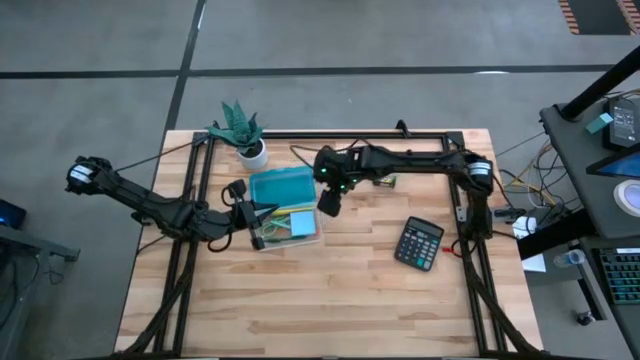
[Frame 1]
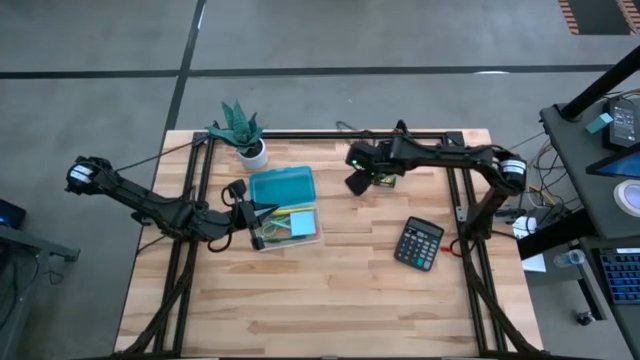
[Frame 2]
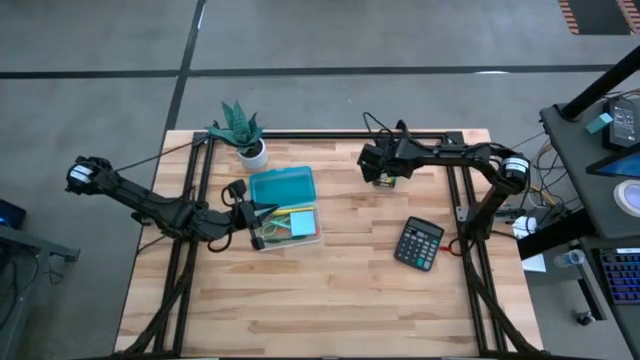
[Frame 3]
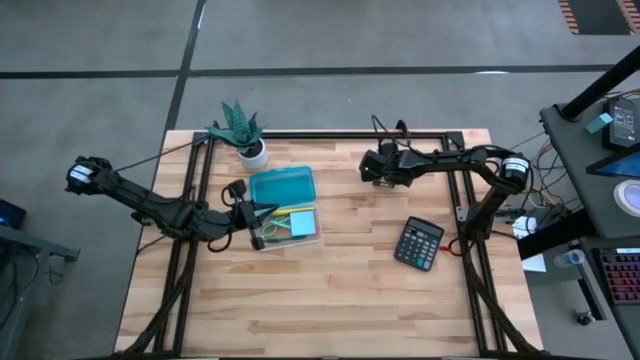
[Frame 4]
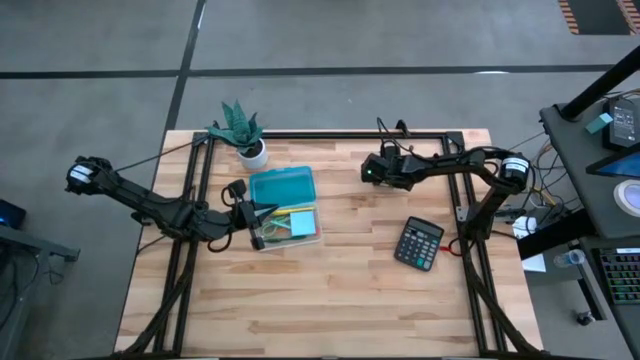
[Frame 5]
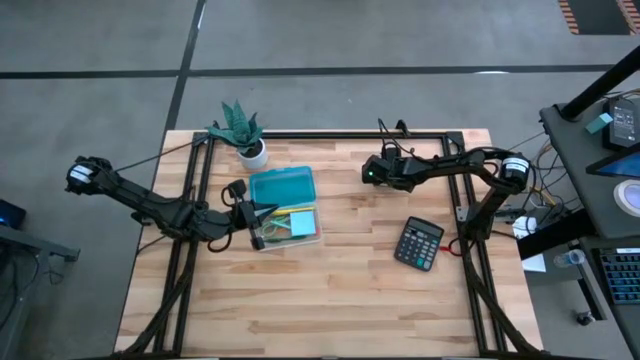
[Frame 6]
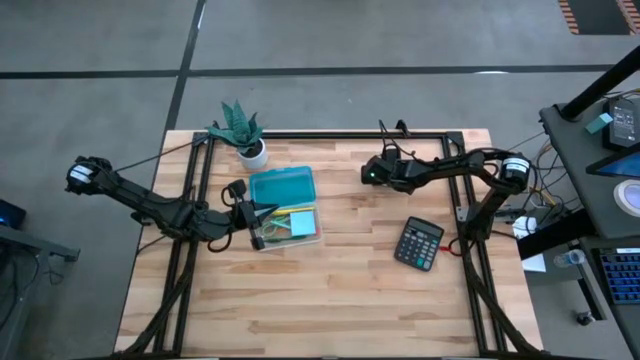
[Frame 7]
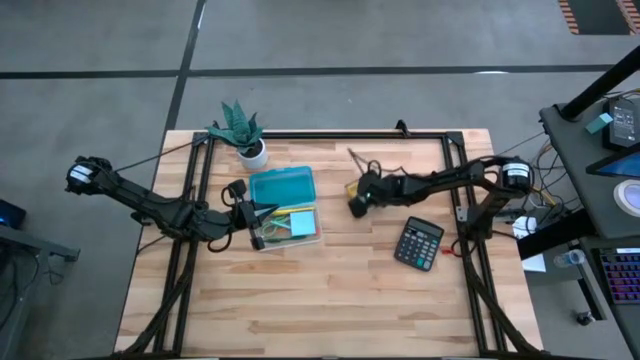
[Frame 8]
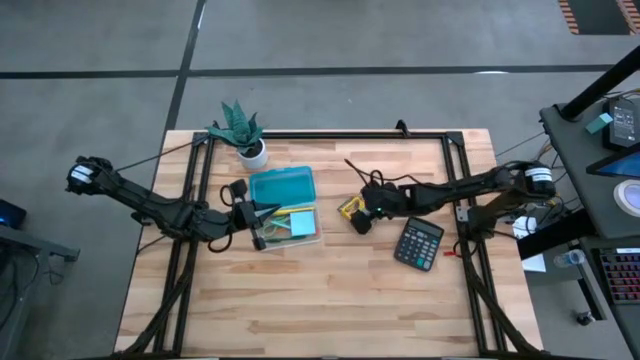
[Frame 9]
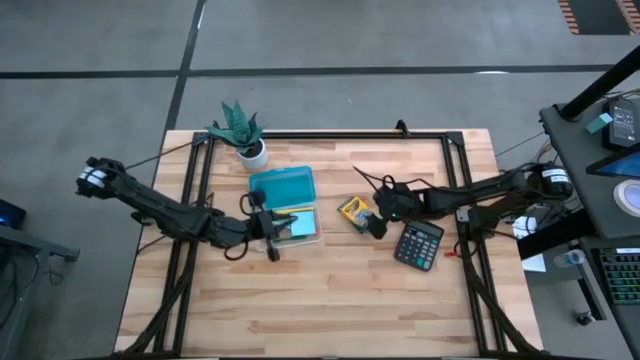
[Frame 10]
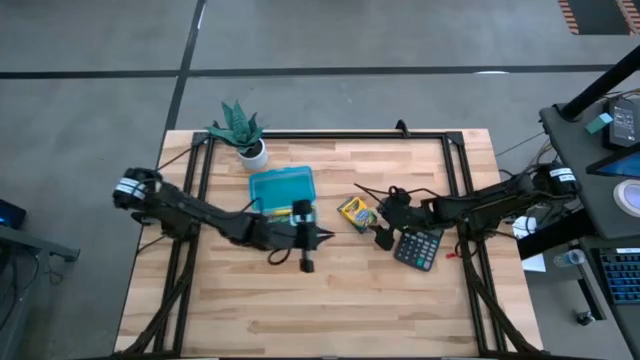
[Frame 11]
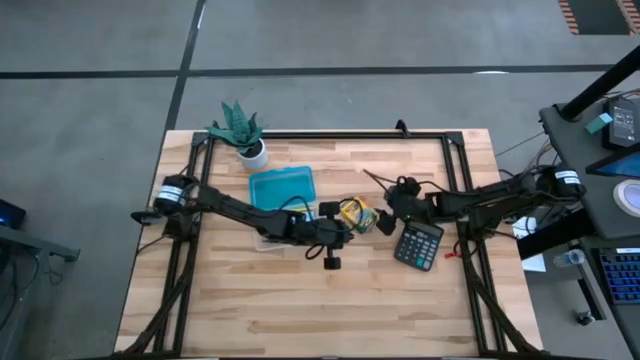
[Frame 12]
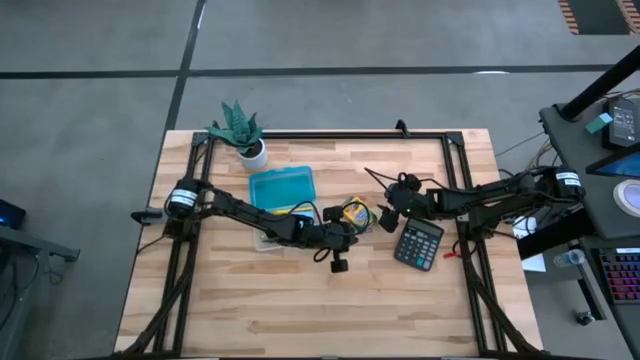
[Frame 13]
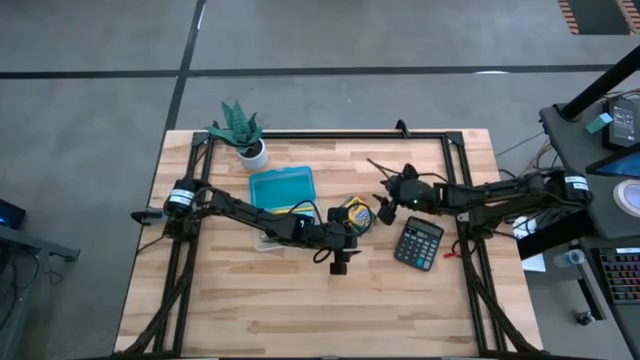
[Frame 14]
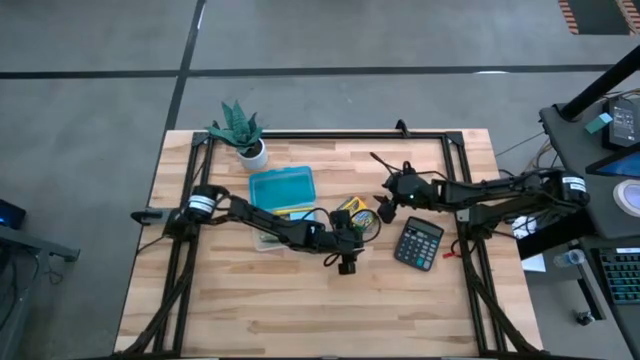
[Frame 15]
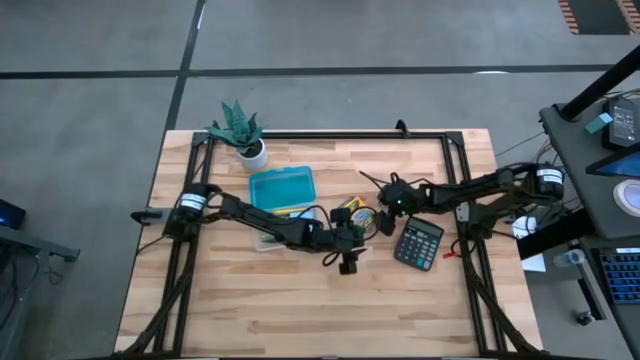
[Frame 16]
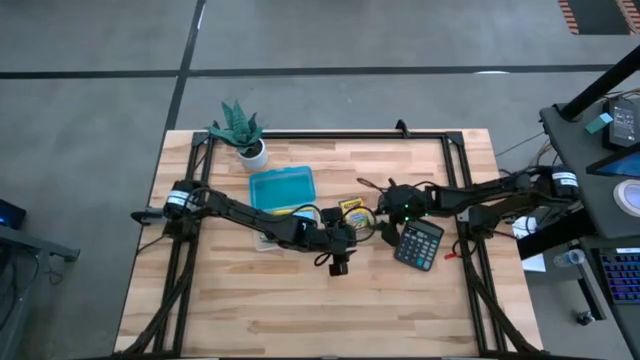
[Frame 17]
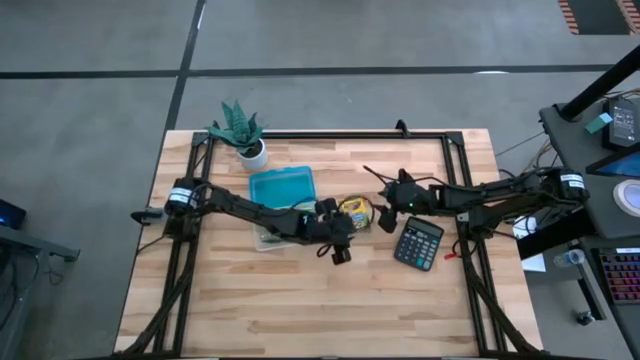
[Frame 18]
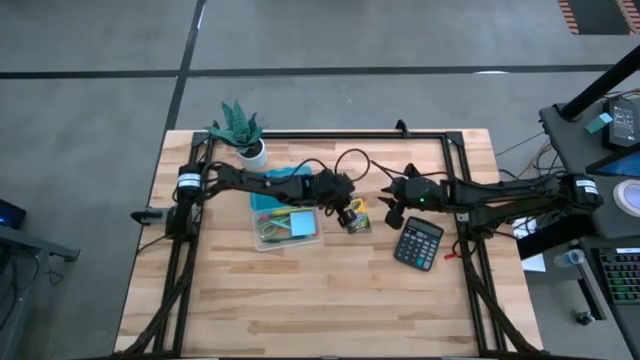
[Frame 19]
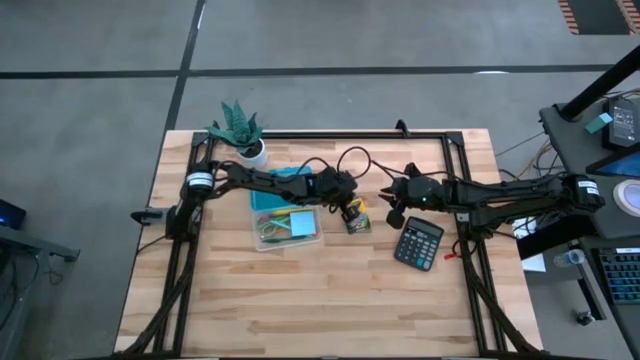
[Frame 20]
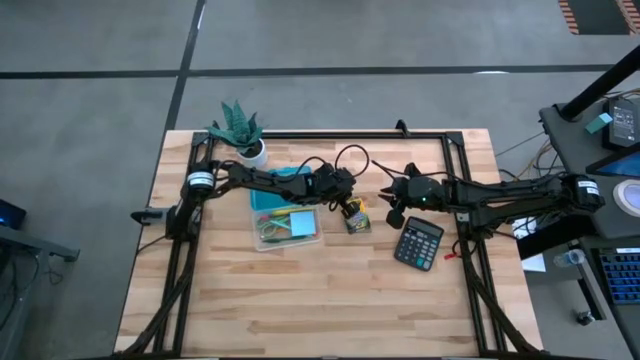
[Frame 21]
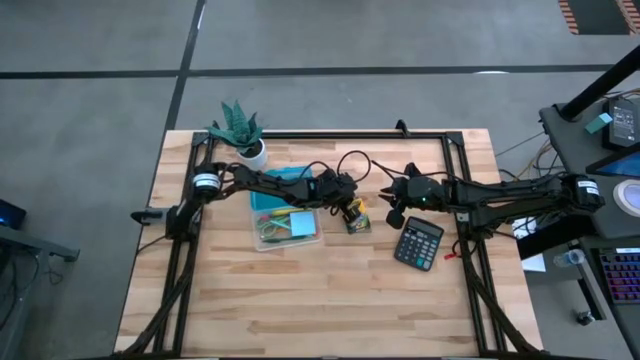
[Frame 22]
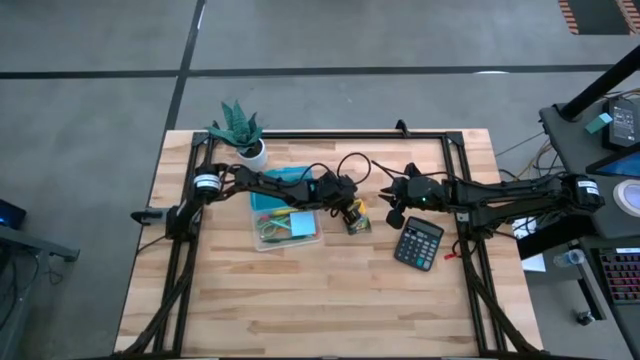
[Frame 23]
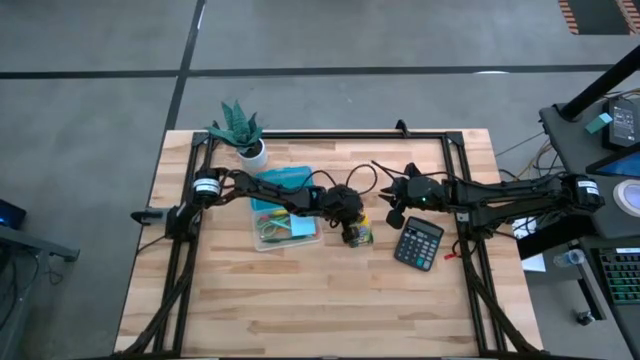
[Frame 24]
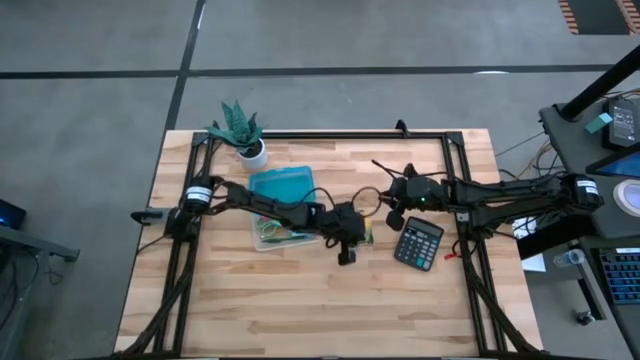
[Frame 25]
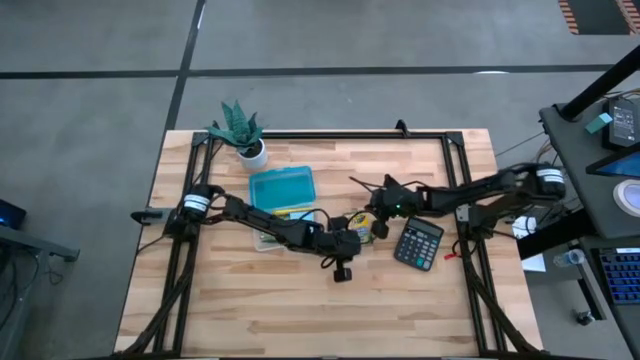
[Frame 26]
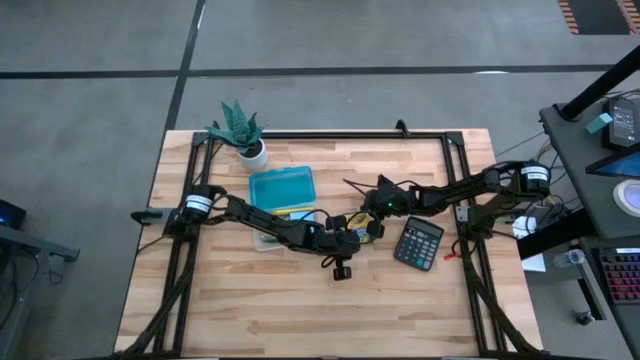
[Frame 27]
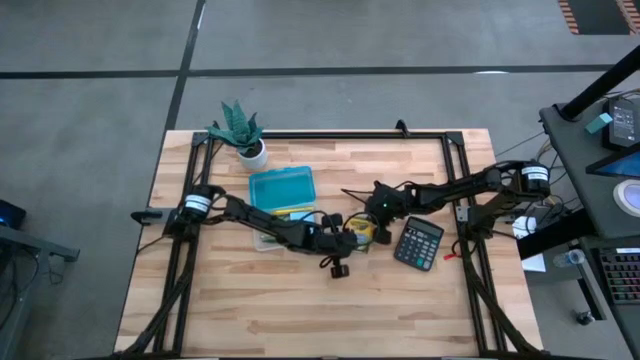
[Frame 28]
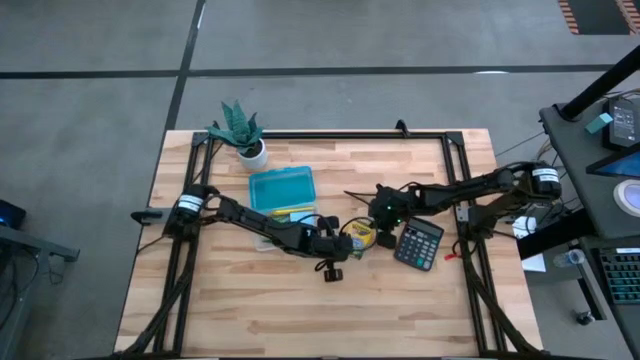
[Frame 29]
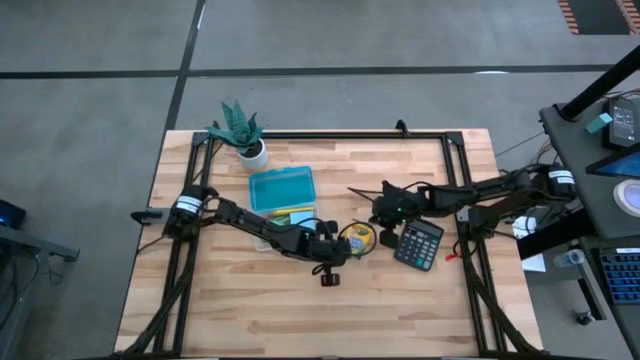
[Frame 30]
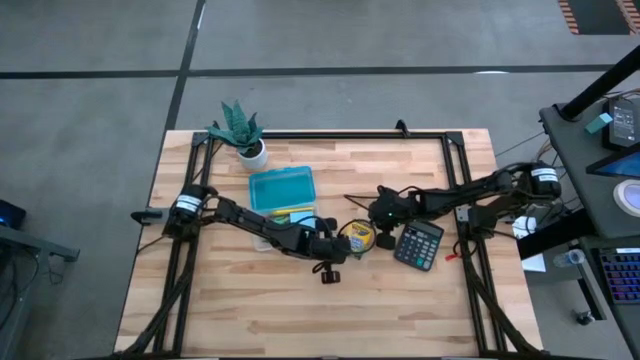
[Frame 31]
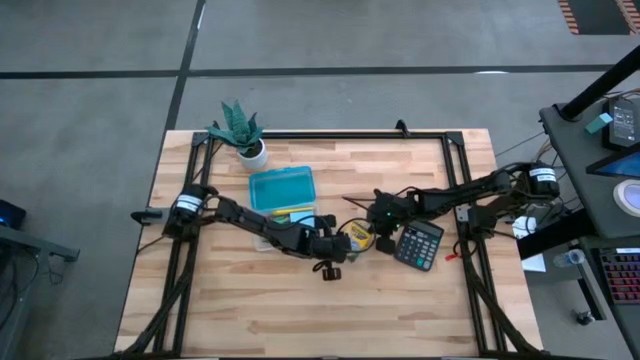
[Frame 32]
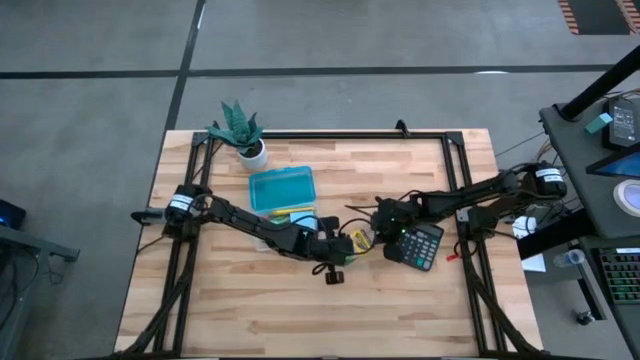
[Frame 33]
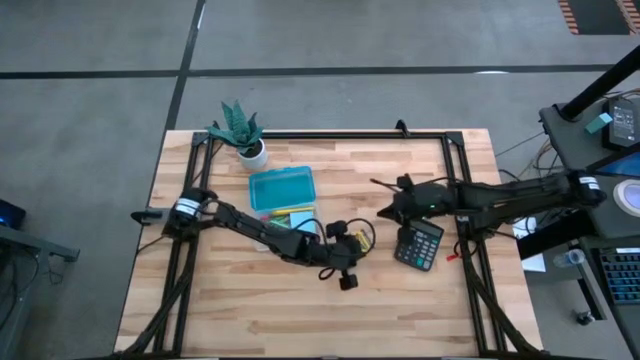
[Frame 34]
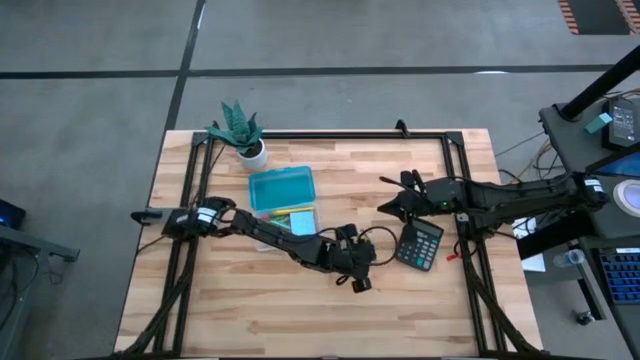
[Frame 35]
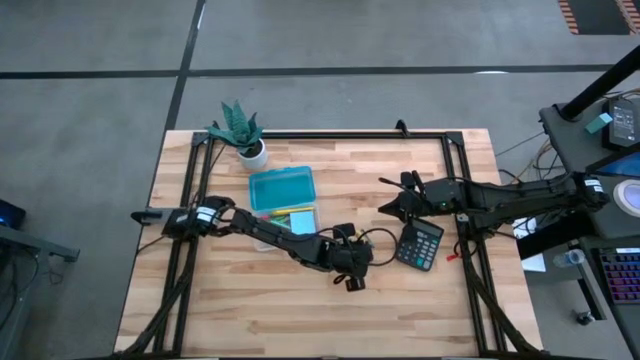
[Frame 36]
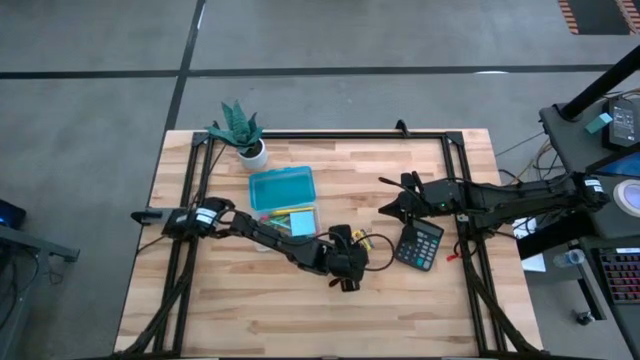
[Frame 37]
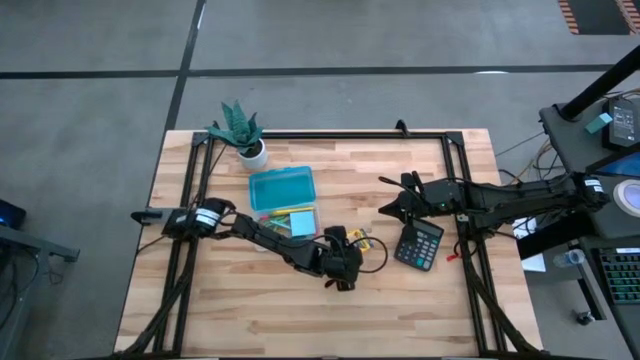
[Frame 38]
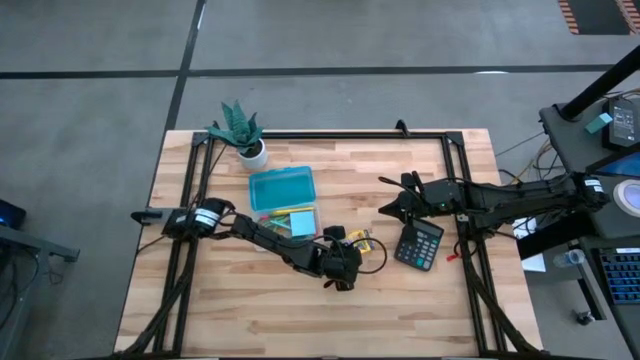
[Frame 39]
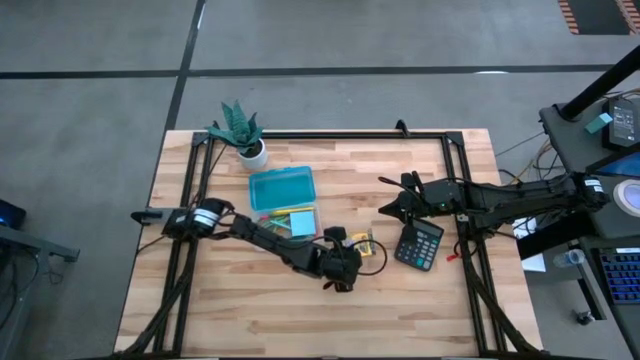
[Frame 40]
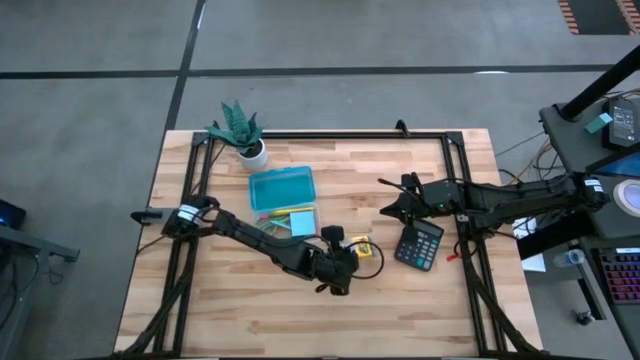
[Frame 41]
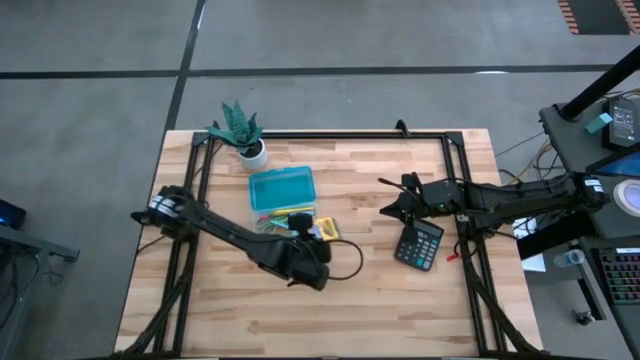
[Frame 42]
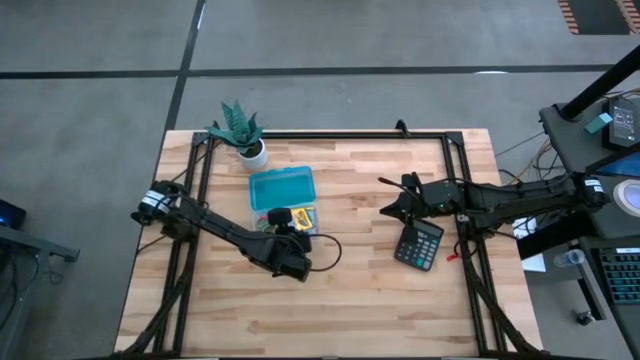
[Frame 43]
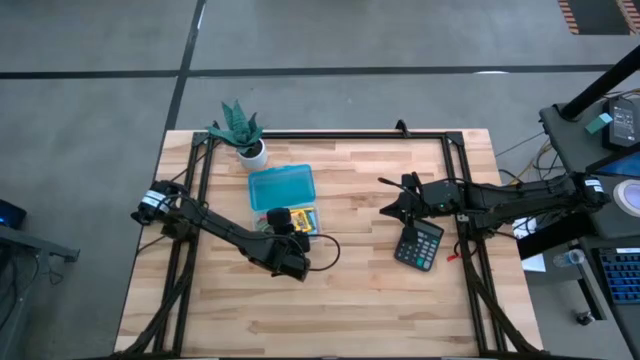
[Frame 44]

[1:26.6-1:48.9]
Task: Pack school essentials
Put the yellow crayon box into the blue supply box
